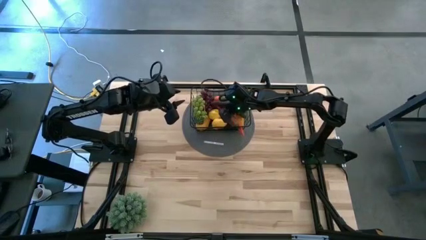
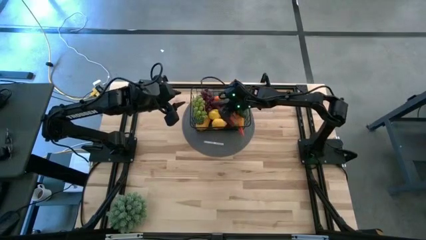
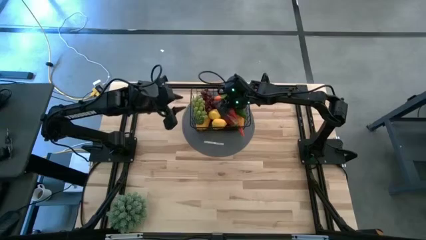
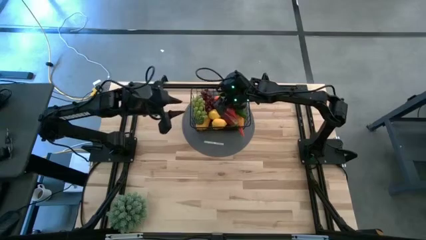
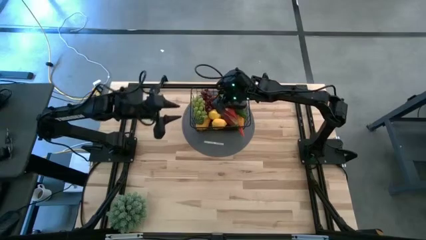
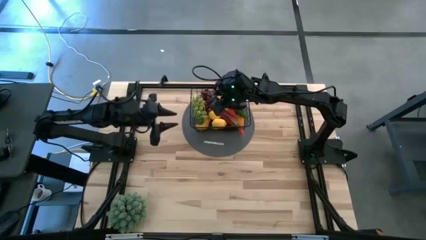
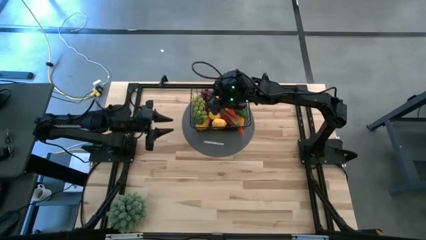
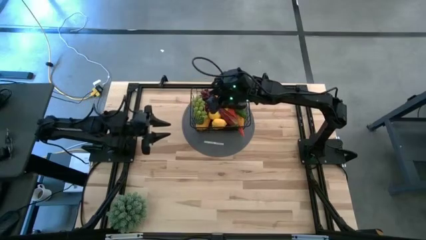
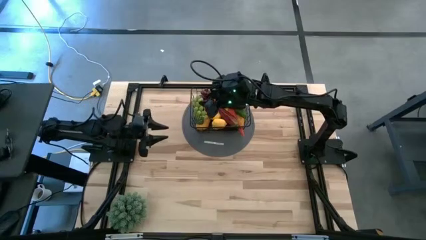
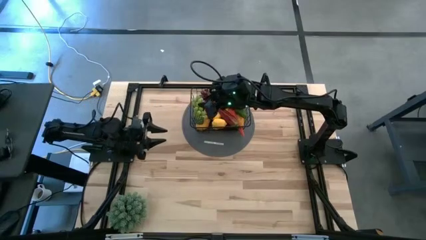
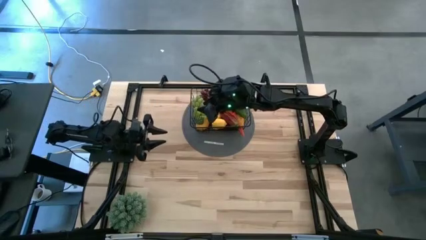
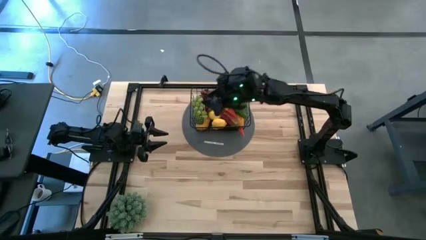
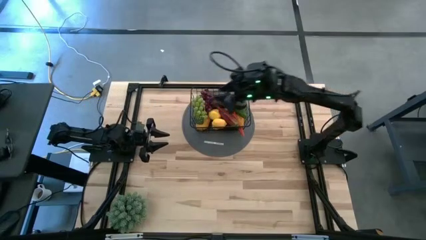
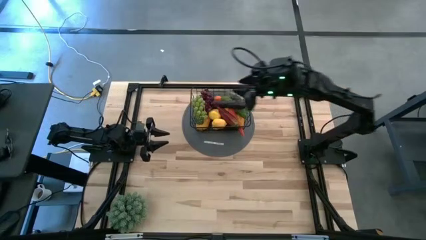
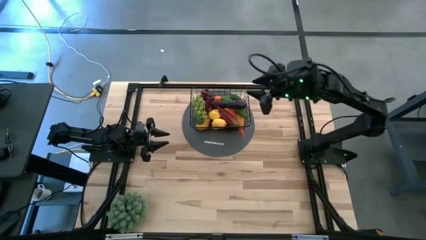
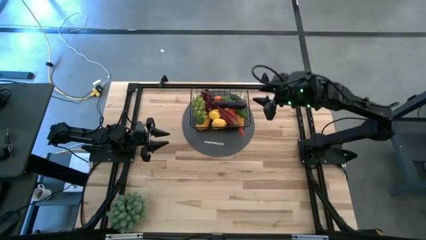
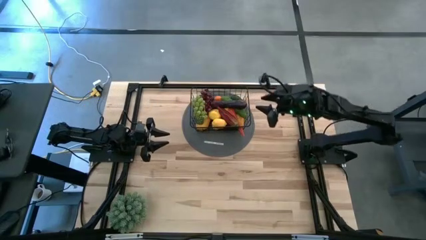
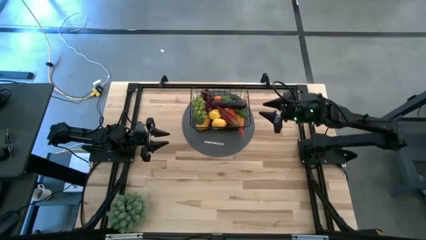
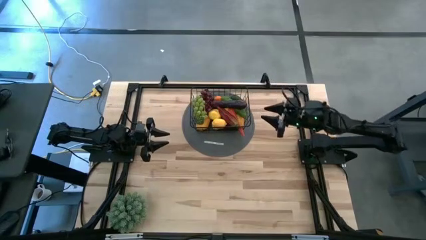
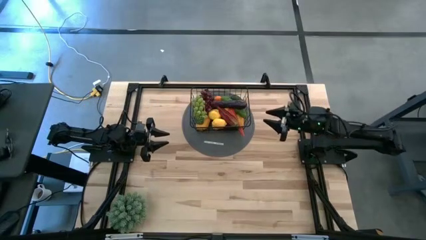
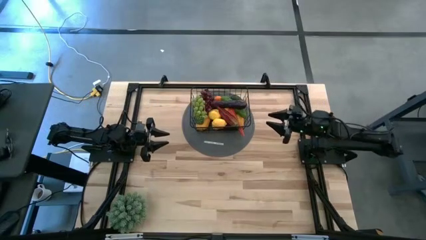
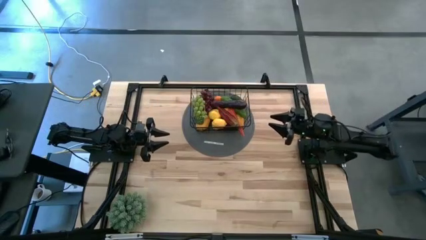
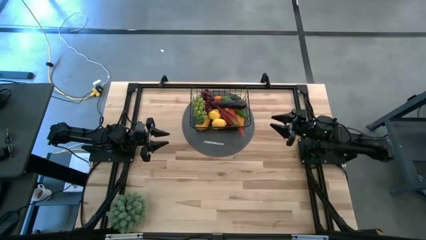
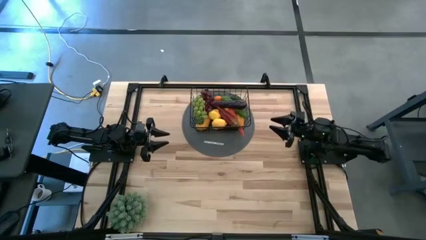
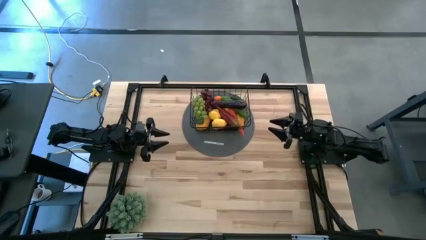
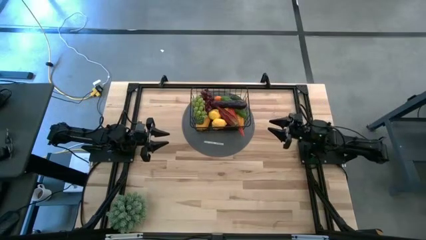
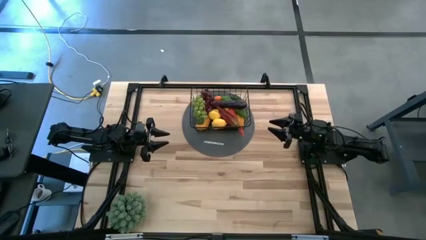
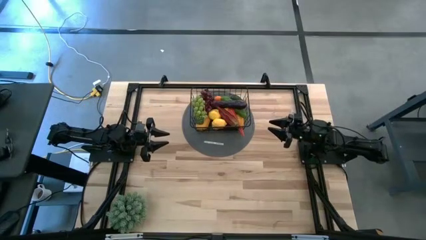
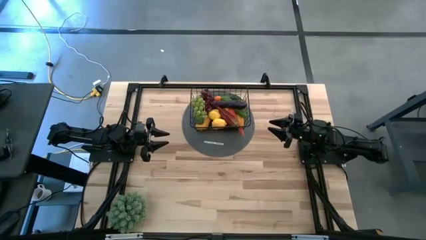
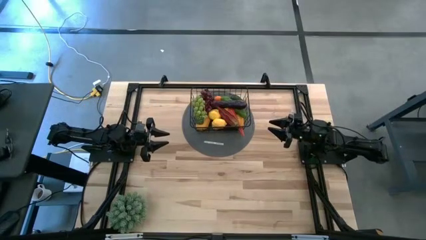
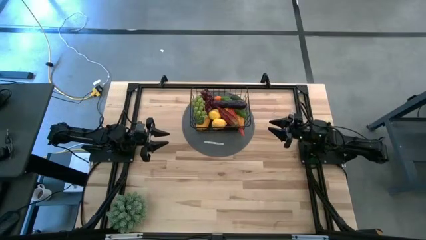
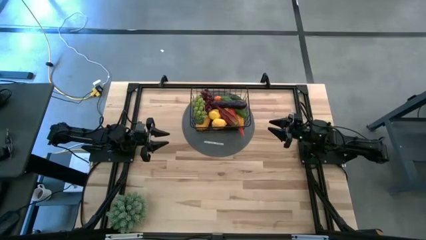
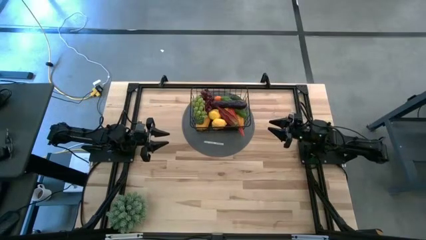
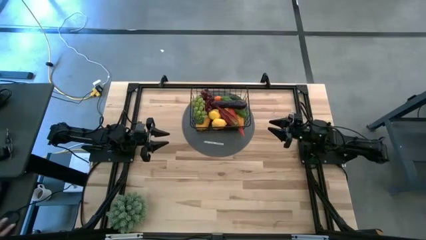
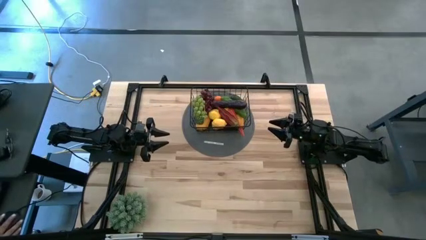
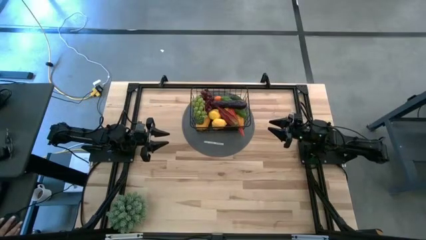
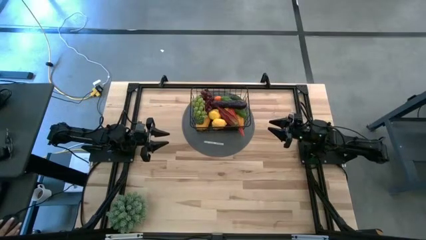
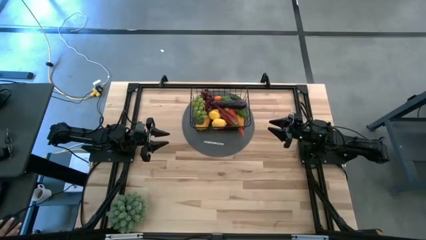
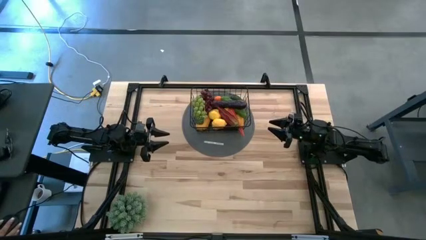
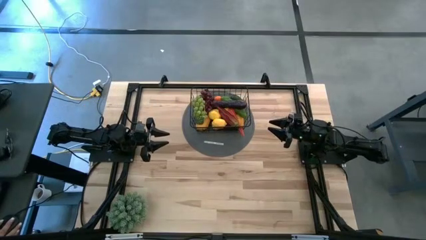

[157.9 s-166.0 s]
Task: Build produce basket
Return to Home Position

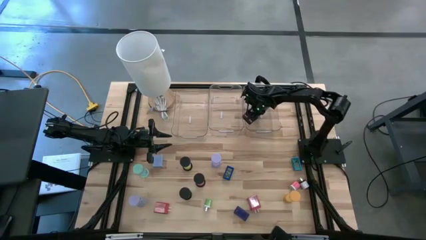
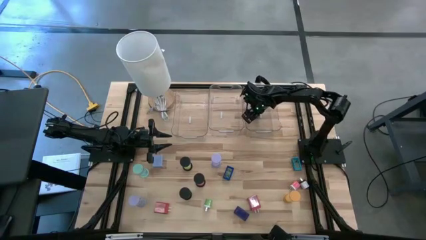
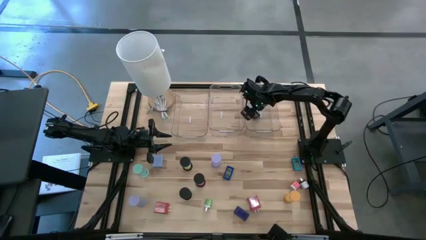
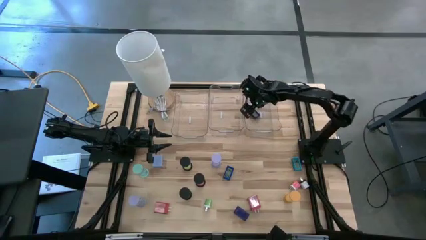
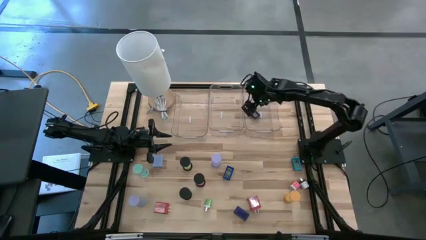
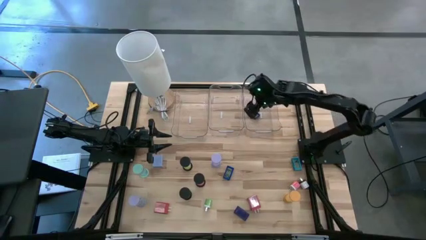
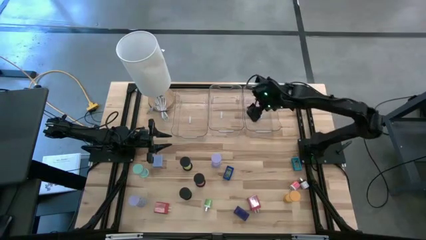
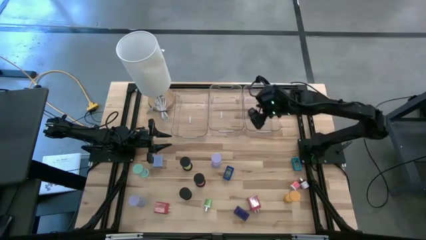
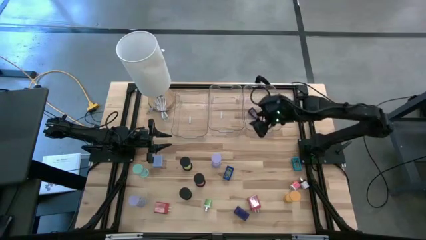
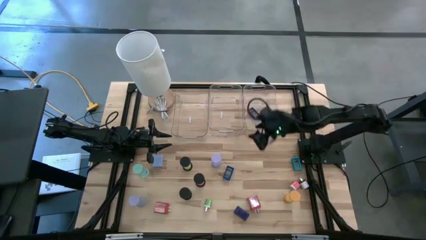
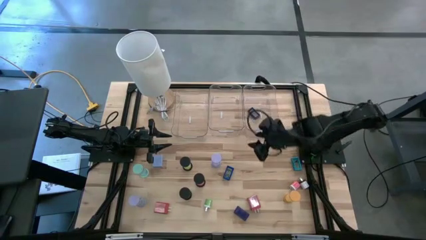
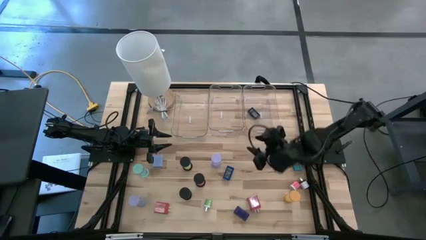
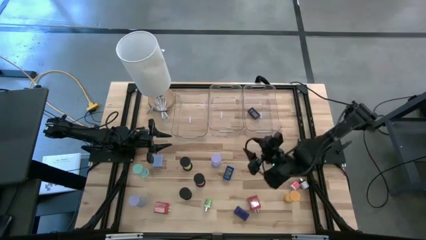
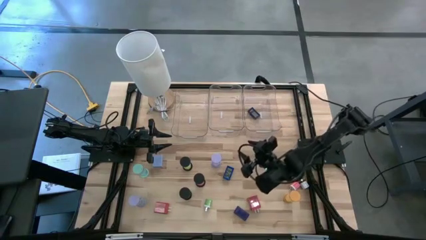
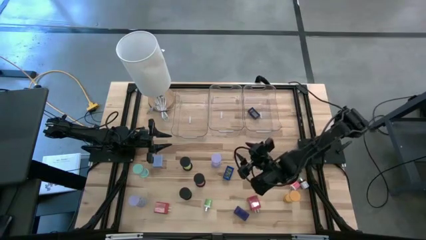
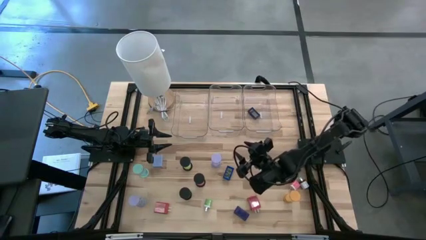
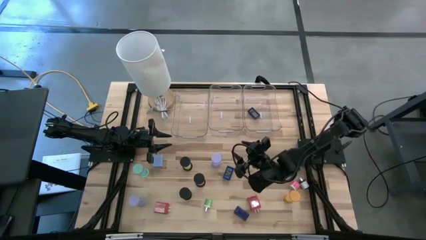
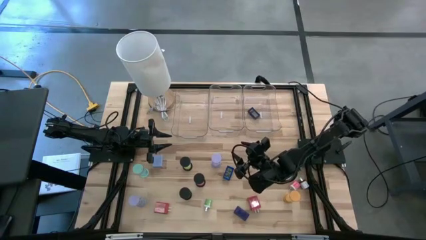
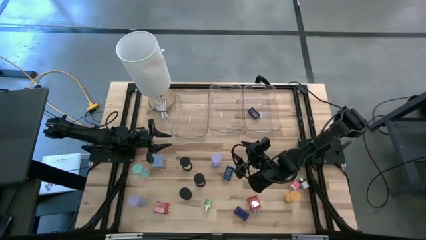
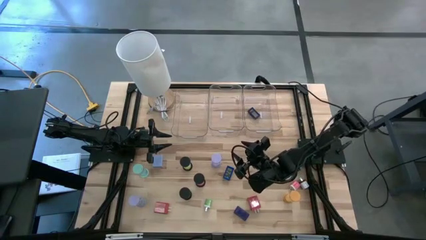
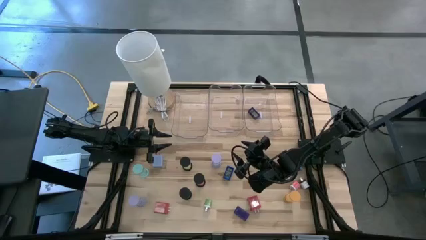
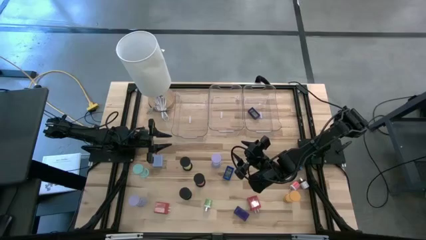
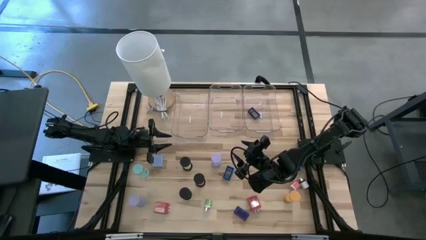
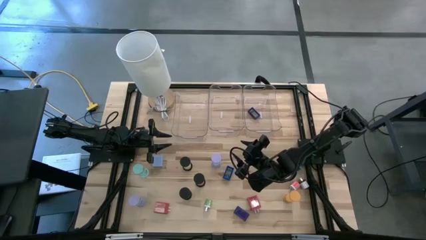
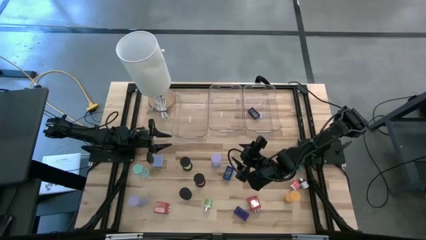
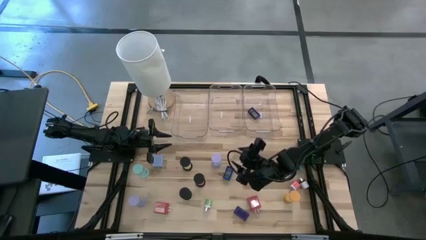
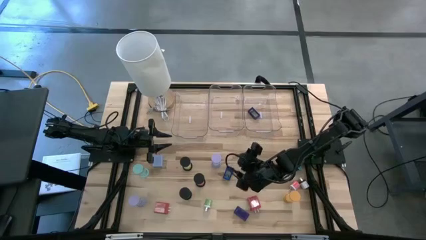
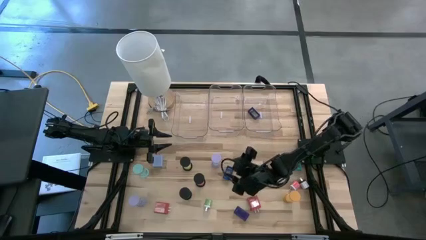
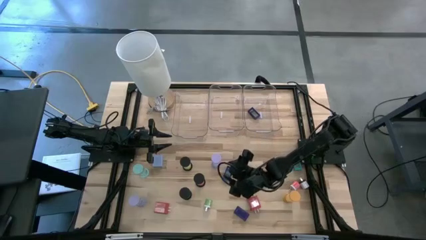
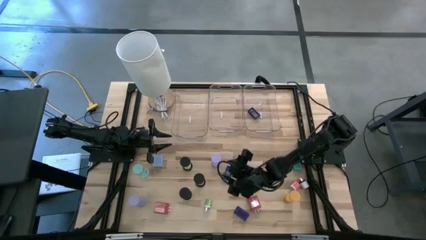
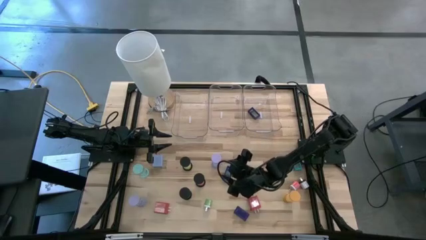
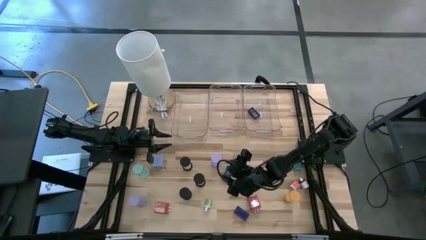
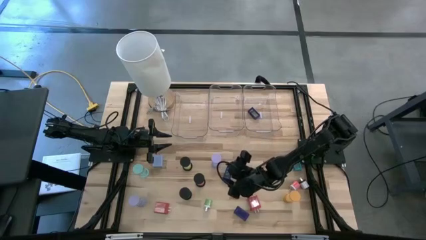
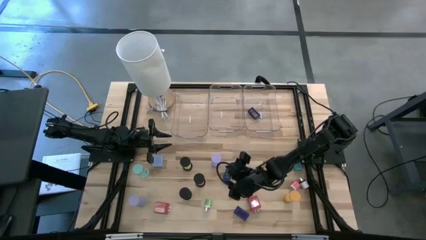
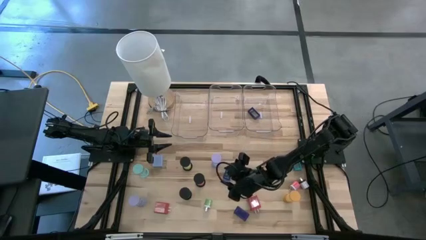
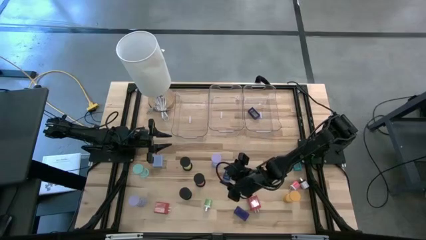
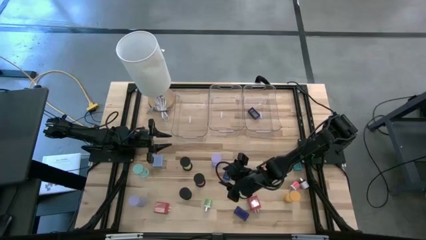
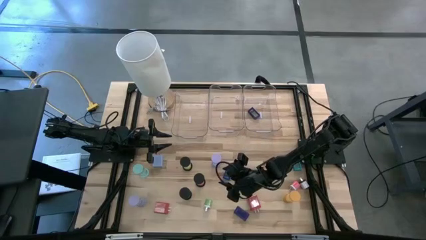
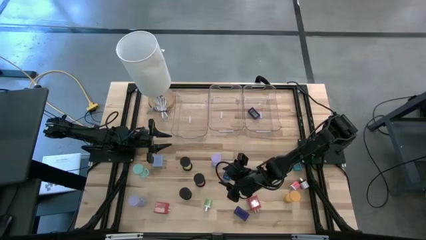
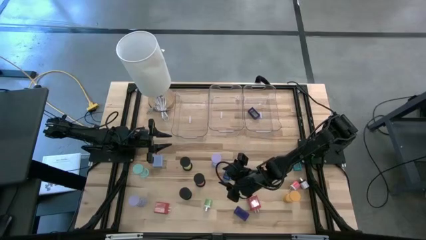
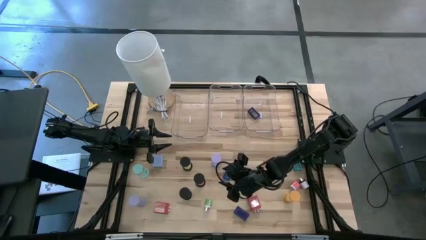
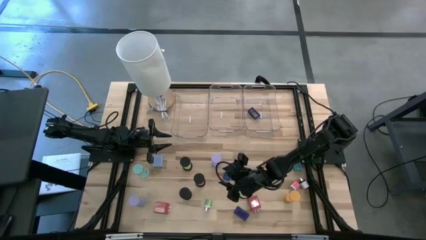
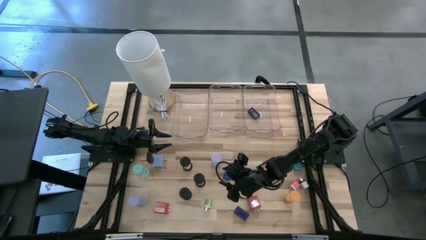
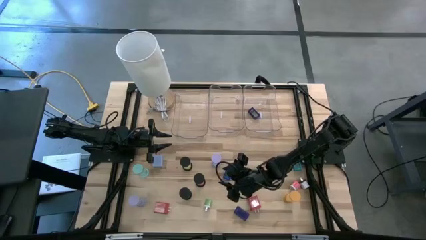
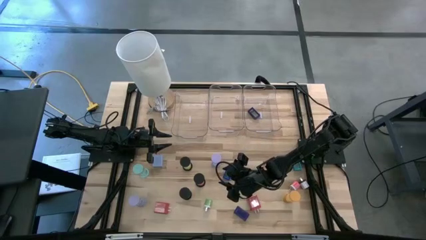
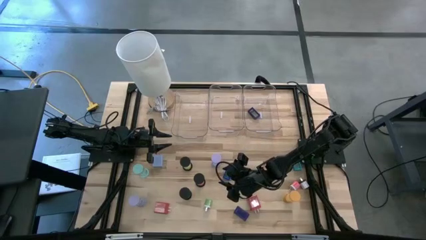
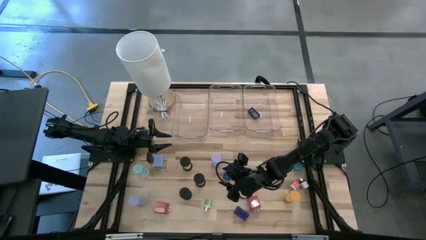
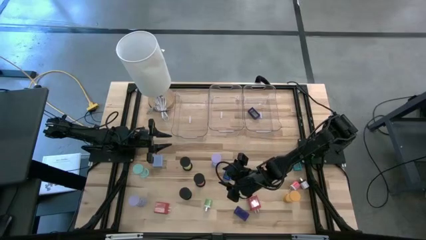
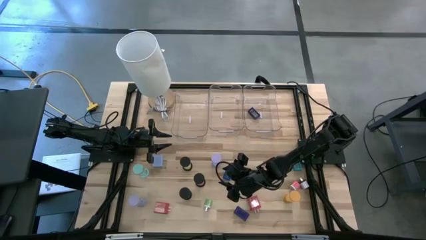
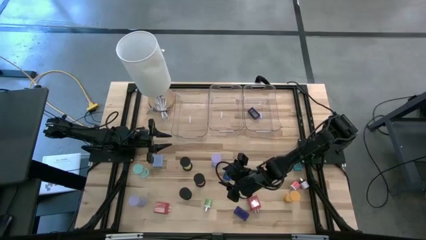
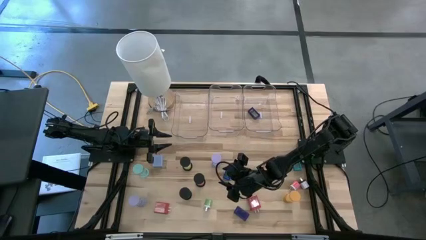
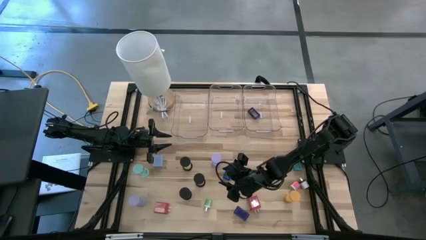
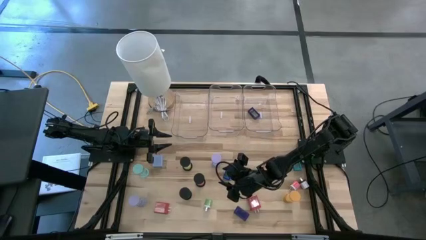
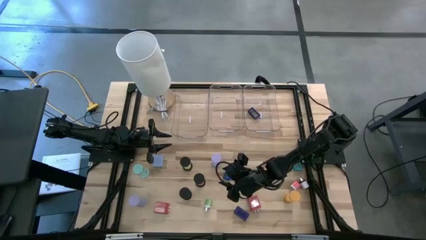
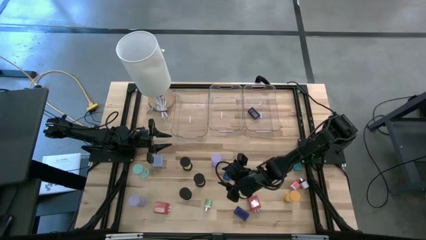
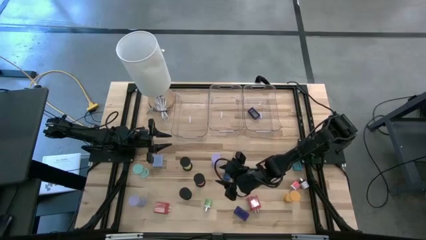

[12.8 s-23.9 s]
Task: Pick & Place Office items
Put the top violet hourglass into the middle transparent bin
